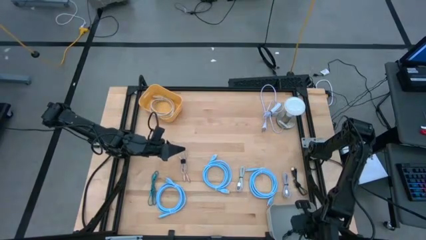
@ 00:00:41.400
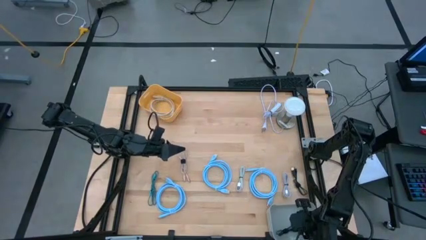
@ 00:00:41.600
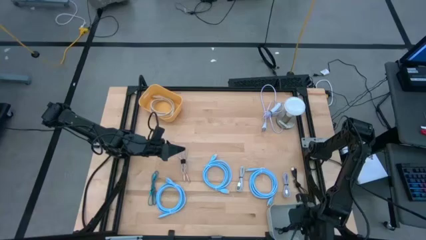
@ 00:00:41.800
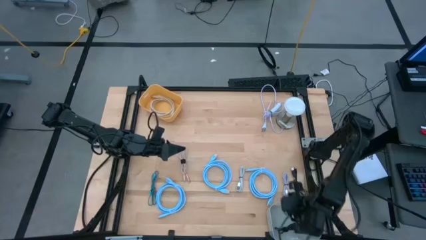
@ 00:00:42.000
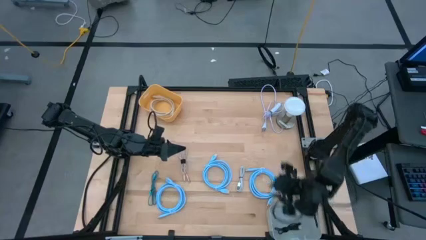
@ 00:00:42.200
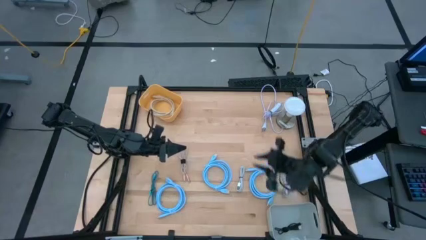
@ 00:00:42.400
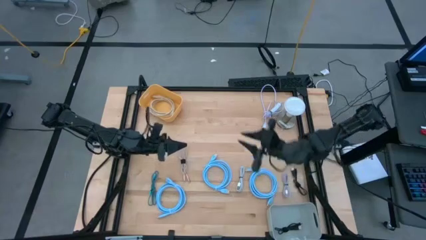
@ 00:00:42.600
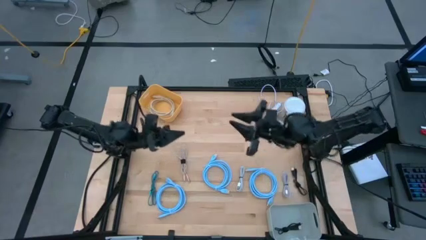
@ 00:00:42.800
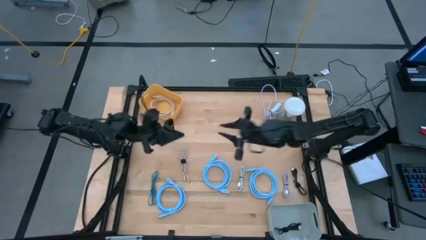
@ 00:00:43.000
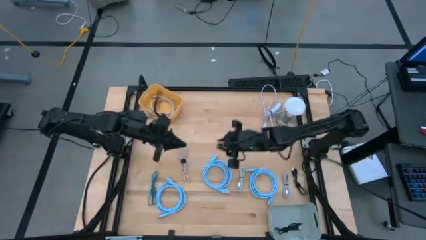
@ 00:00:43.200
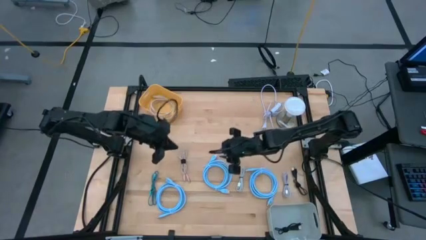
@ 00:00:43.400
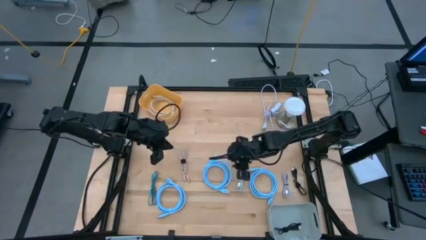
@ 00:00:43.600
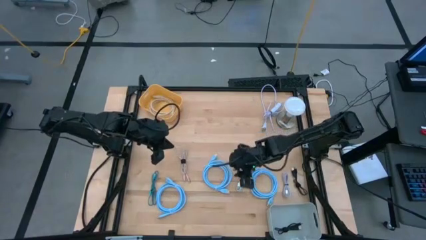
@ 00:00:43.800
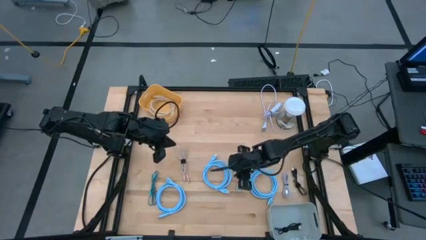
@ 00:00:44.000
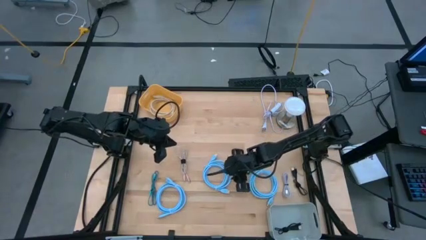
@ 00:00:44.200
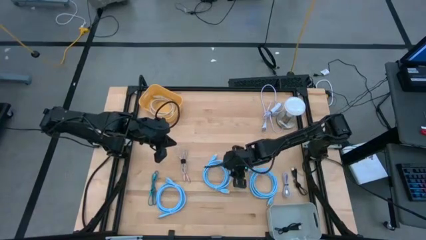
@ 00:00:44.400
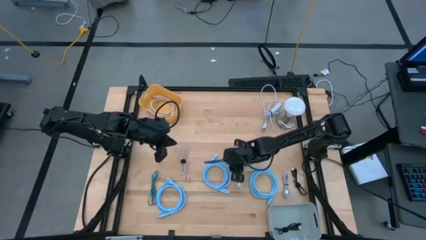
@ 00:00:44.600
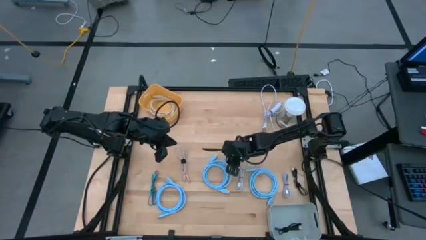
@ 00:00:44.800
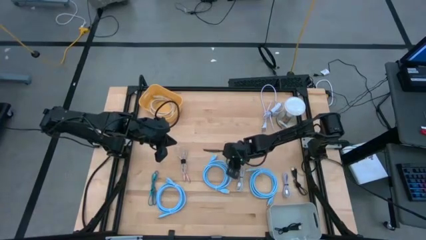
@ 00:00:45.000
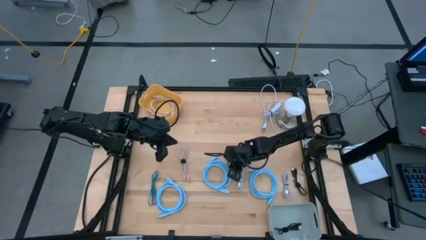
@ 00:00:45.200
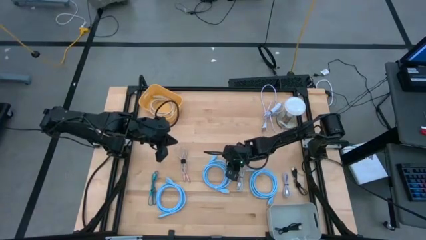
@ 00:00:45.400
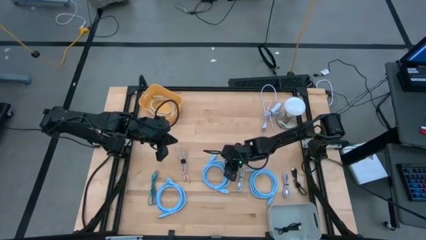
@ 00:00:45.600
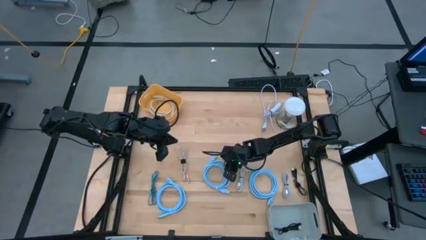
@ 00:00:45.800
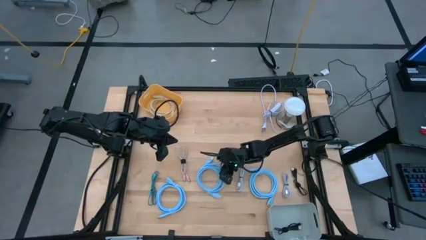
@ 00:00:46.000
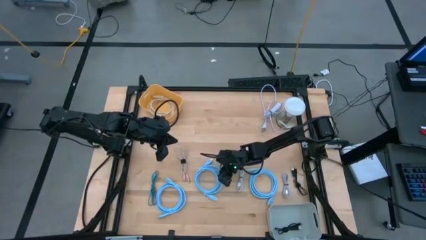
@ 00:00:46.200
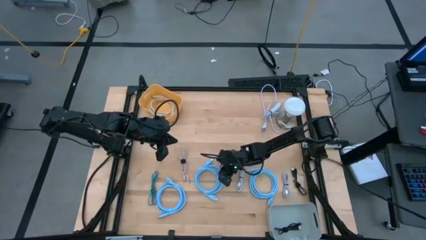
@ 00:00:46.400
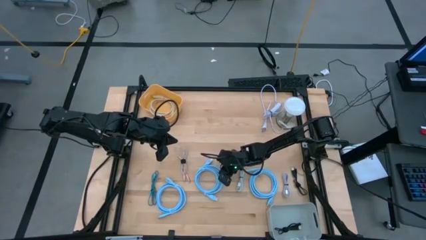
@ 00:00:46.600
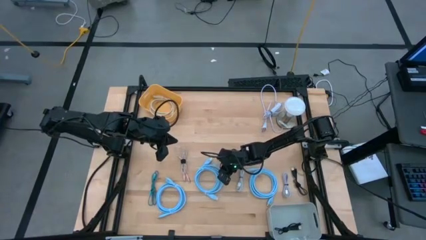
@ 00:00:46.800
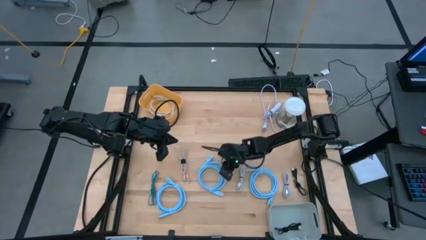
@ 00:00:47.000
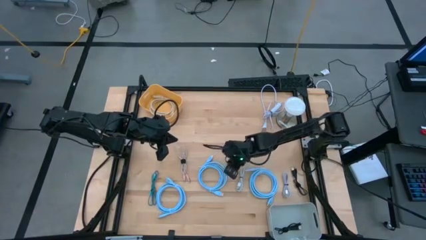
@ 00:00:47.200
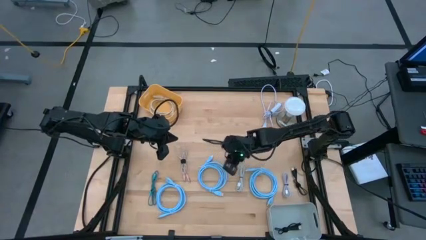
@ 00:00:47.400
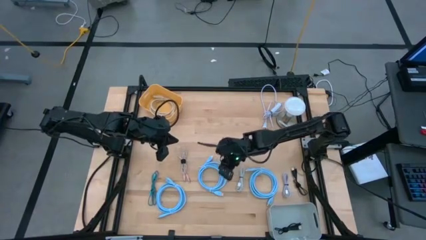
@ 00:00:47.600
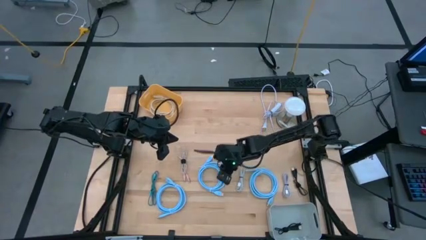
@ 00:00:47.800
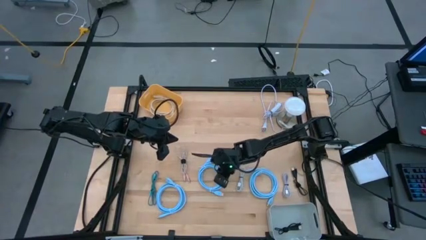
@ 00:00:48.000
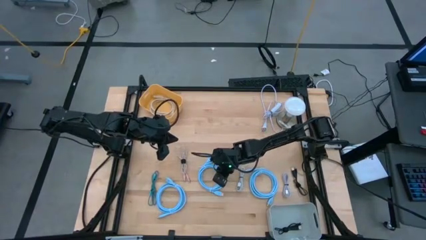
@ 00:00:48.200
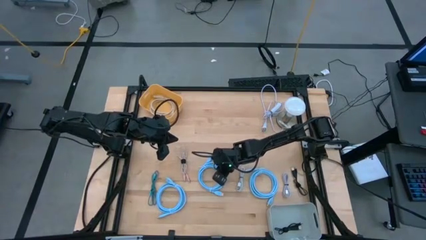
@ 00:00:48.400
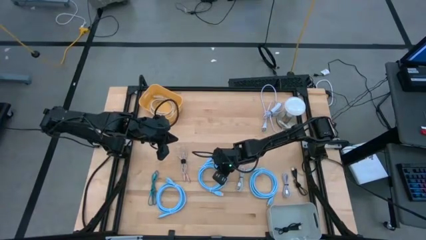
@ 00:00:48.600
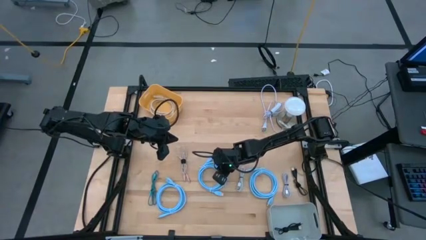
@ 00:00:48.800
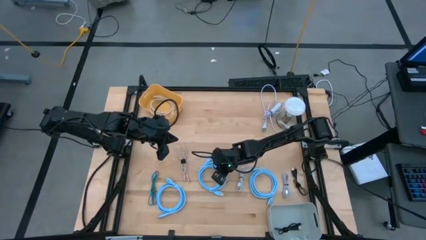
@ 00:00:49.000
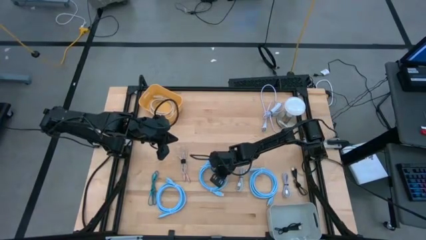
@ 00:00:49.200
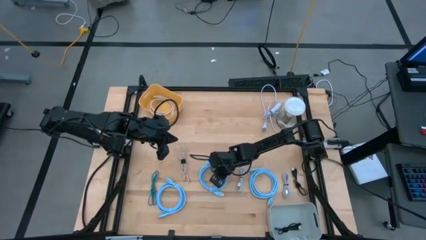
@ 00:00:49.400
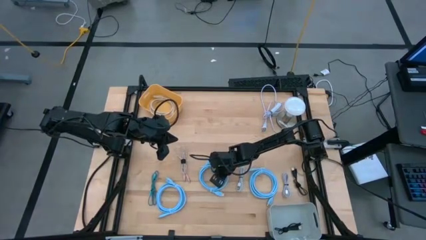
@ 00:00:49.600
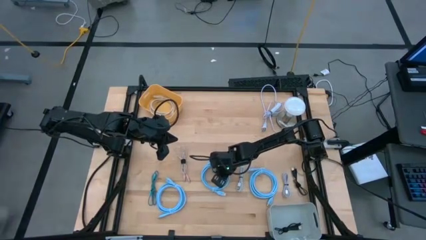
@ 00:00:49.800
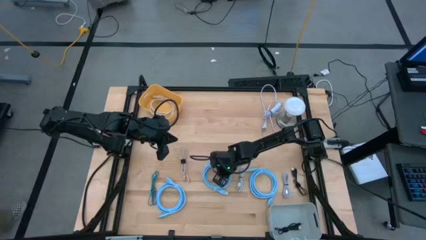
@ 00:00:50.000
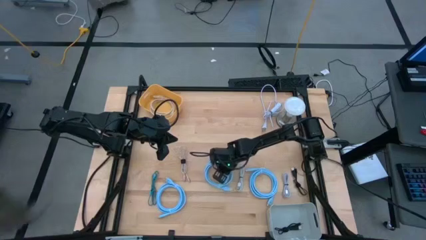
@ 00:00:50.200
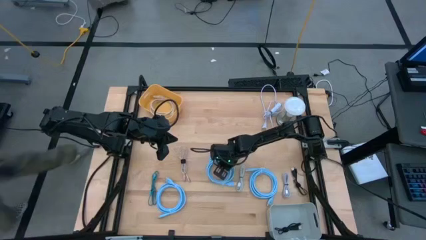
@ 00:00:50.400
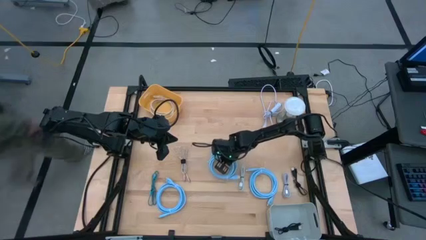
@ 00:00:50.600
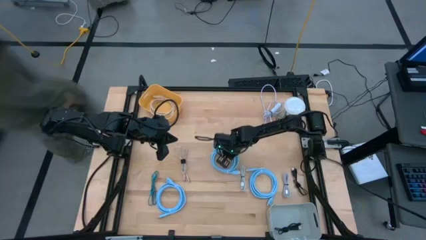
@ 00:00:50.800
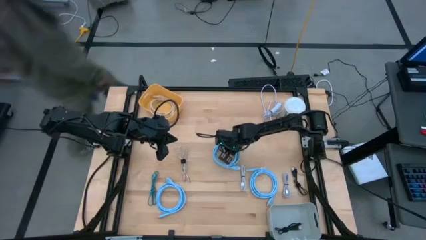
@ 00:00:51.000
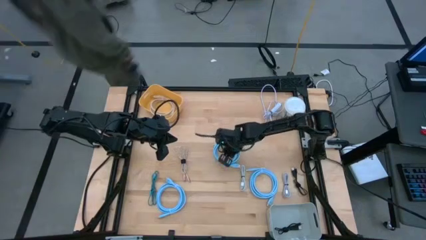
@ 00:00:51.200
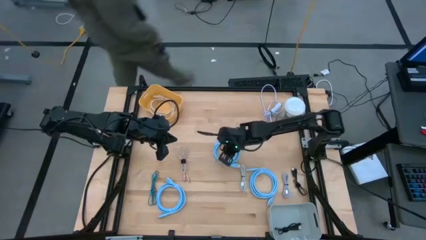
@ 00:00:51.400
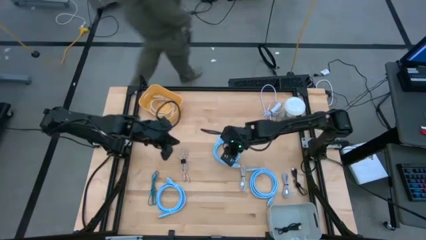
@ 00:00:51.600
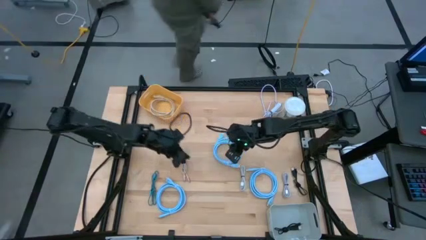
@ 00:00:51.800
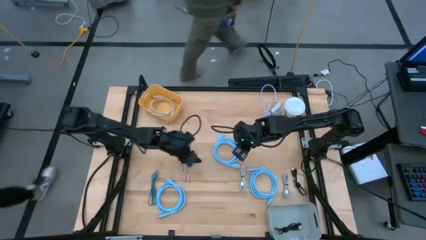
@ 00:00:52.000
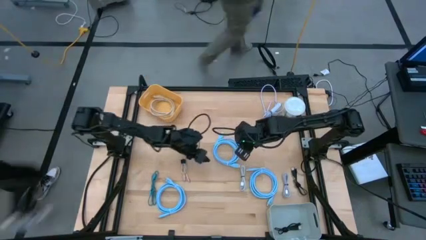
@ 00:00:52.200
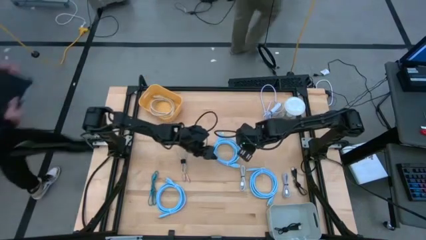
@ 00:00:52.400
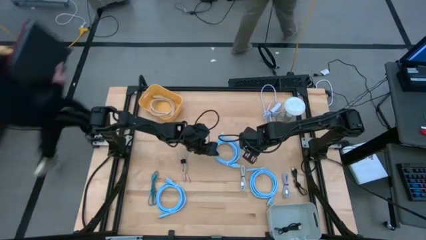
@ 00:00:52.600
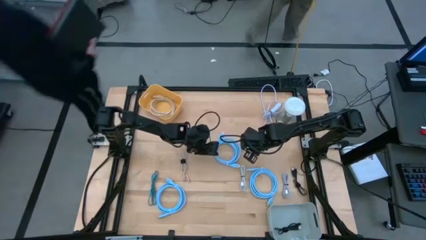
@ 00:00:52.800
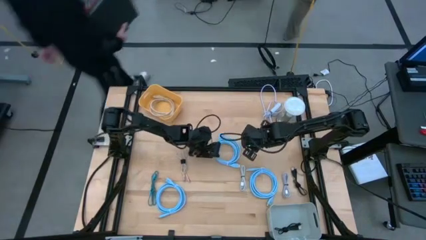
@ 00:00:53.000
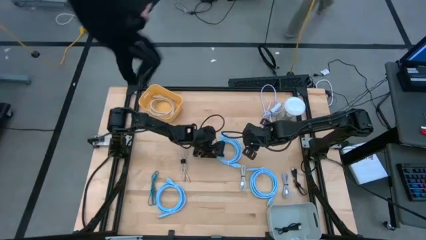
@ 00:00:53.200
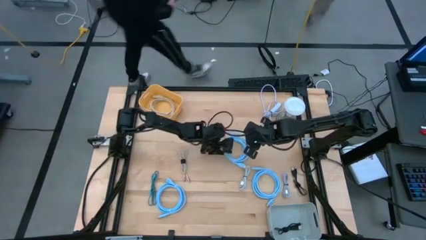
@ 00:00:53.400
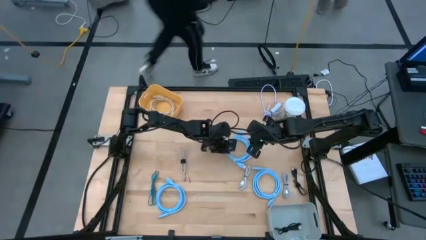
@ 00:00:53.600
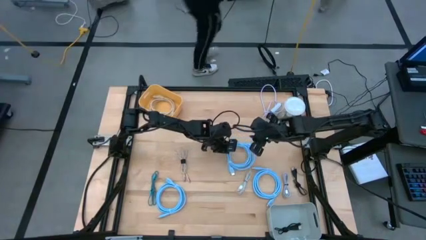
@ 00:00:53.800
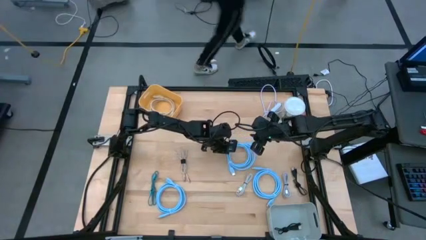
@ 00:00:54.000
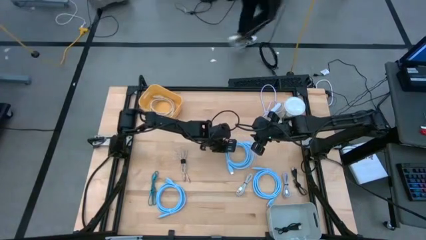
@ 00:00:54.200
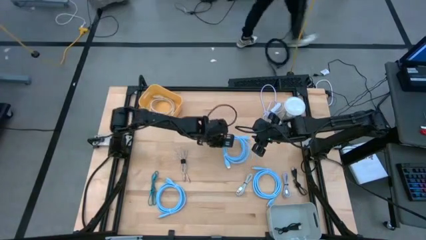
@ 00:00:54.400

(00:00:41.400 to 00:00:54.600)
Task: Pick & Place USB Port
Put the middle blue hdmi cable into the yellow bin
